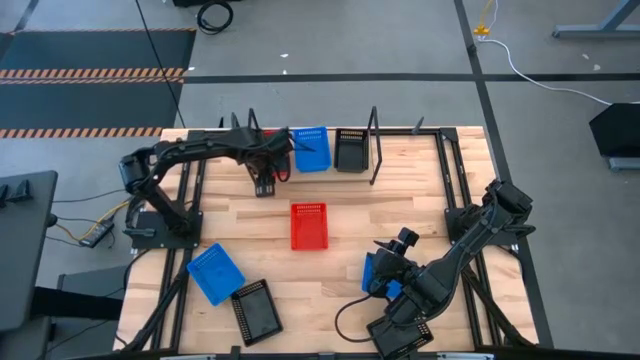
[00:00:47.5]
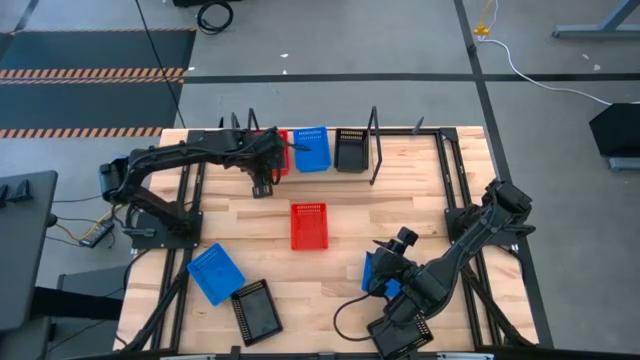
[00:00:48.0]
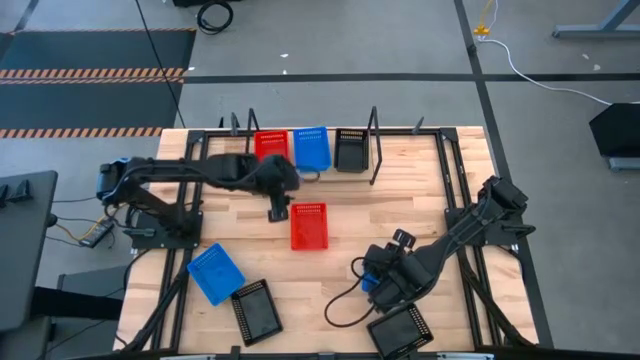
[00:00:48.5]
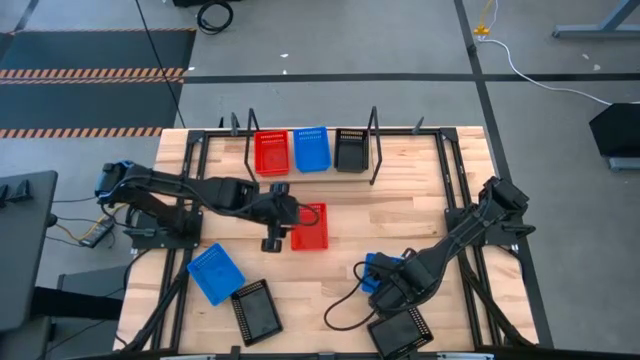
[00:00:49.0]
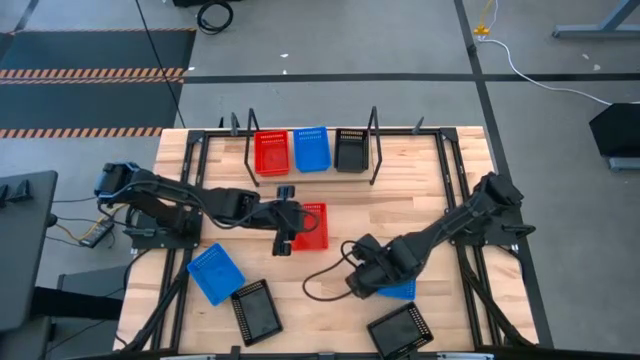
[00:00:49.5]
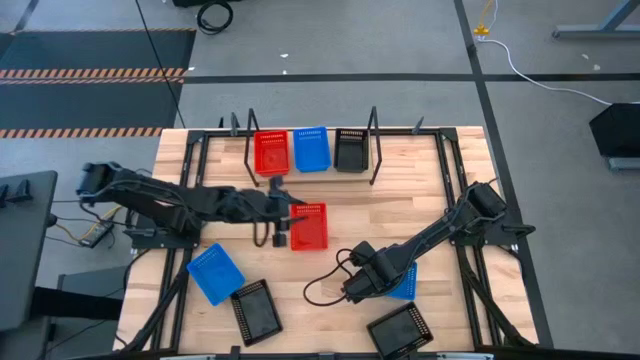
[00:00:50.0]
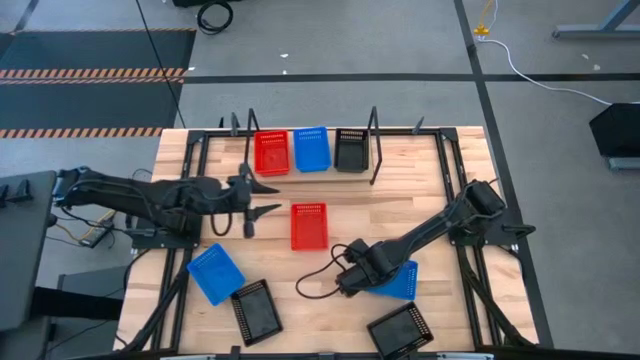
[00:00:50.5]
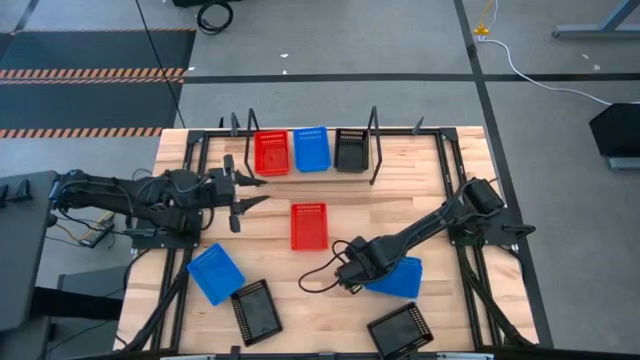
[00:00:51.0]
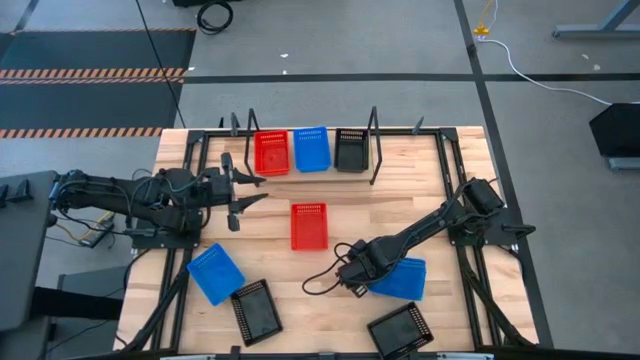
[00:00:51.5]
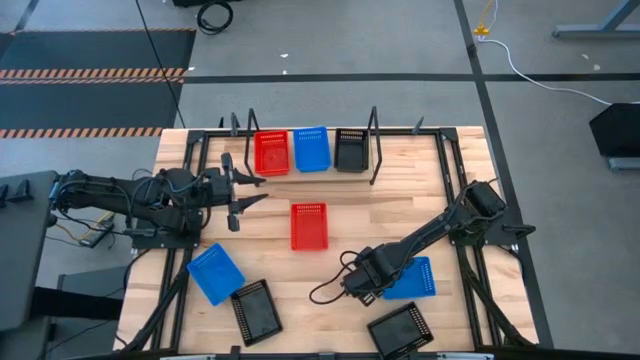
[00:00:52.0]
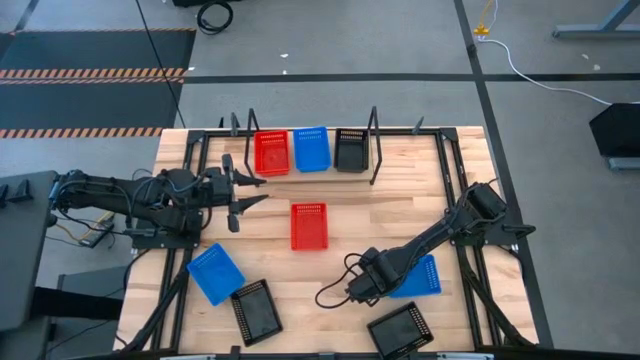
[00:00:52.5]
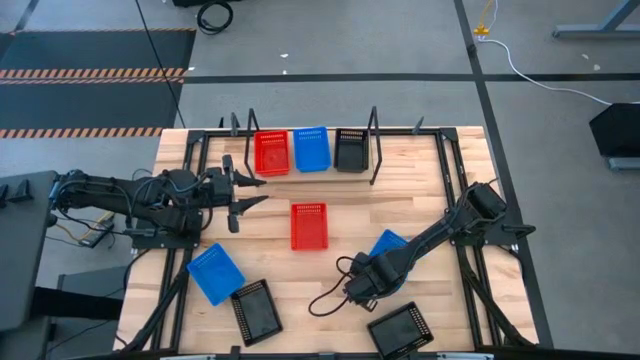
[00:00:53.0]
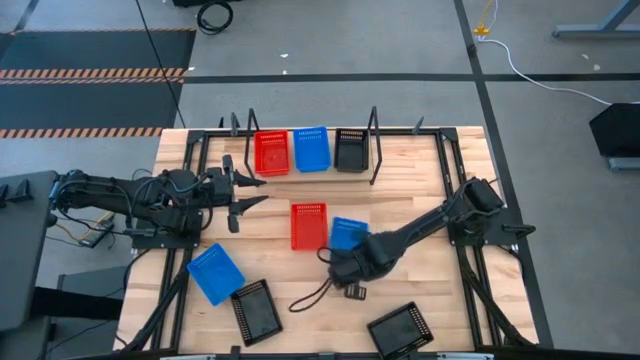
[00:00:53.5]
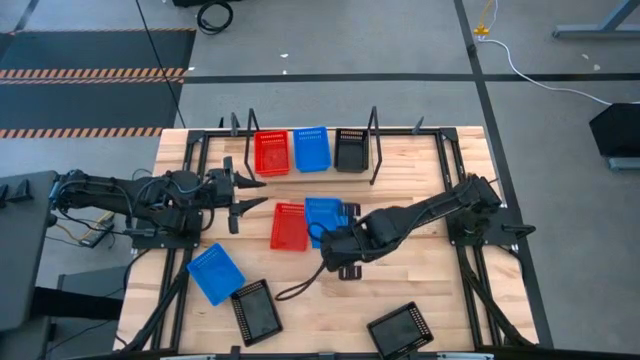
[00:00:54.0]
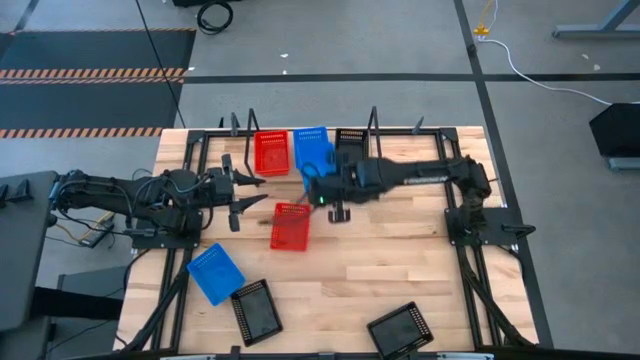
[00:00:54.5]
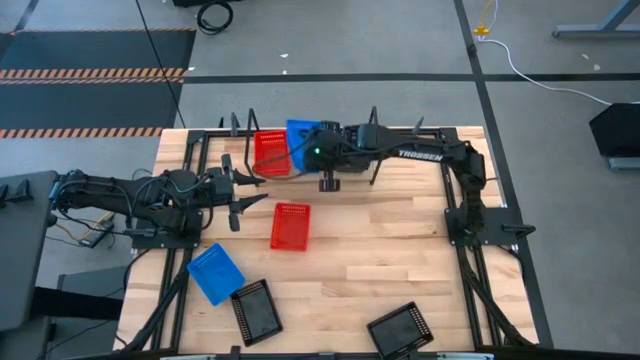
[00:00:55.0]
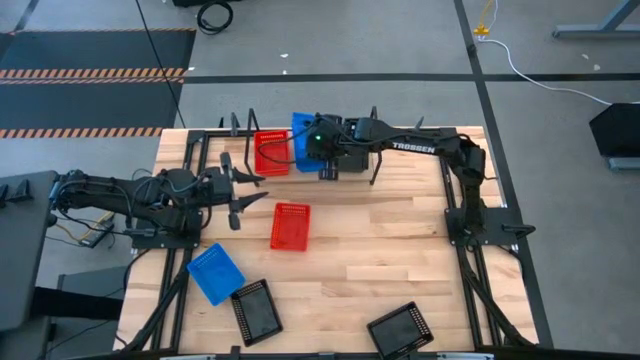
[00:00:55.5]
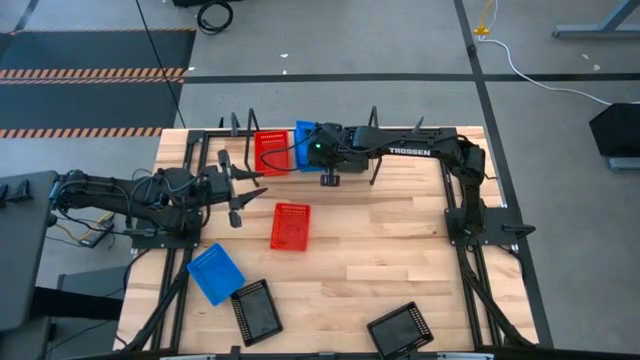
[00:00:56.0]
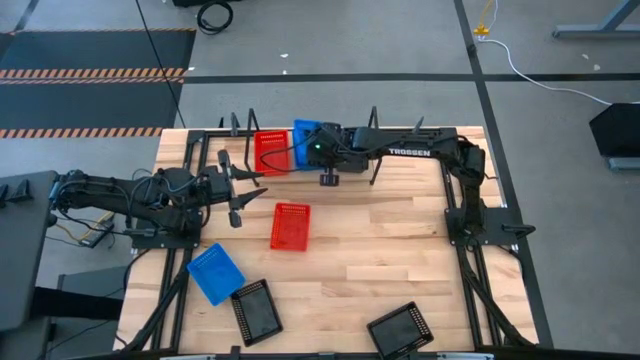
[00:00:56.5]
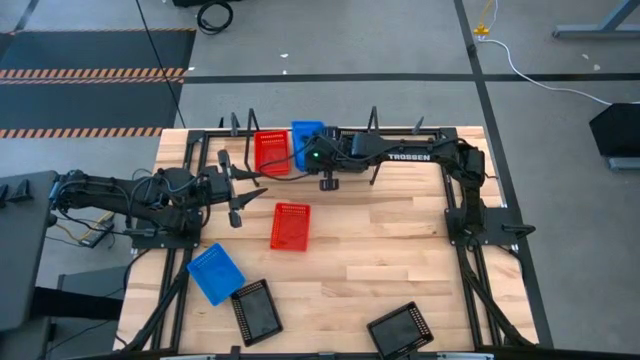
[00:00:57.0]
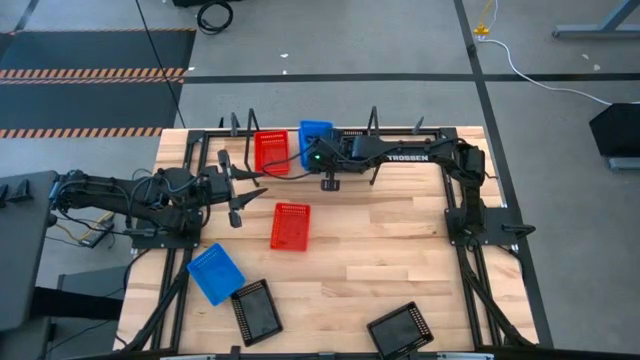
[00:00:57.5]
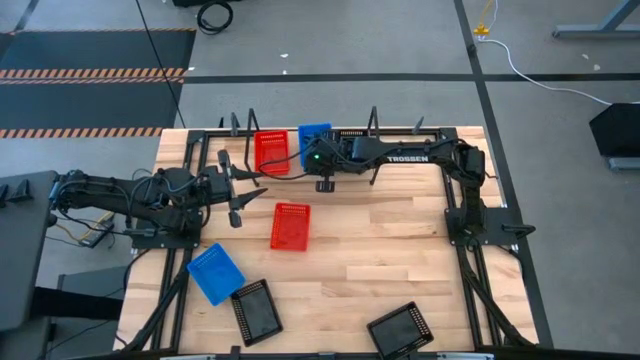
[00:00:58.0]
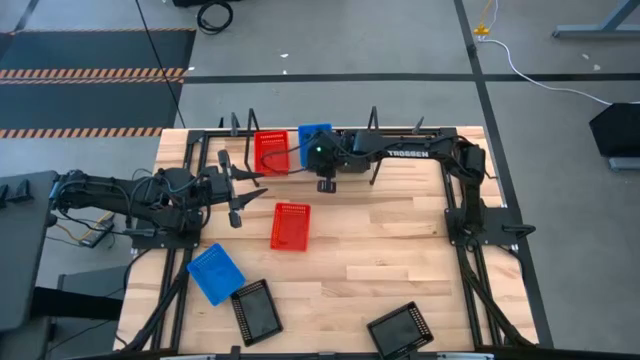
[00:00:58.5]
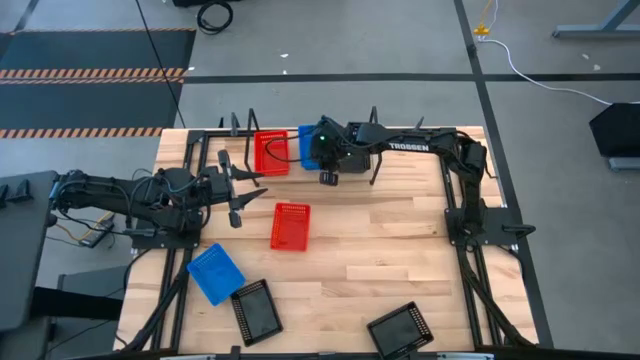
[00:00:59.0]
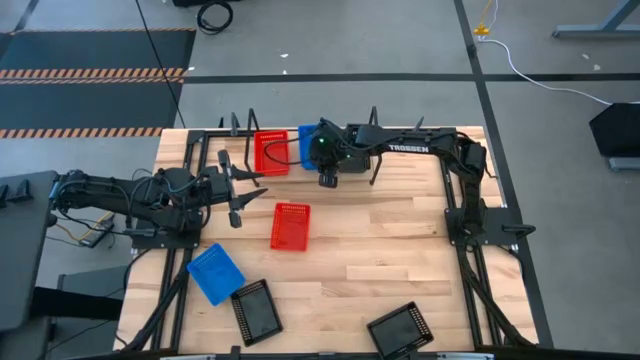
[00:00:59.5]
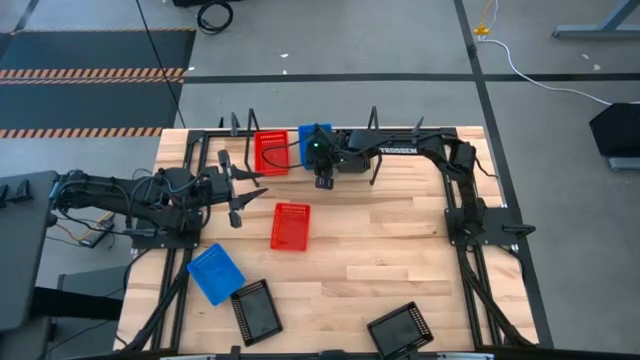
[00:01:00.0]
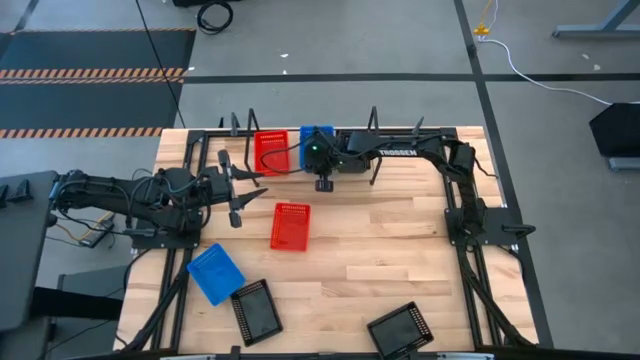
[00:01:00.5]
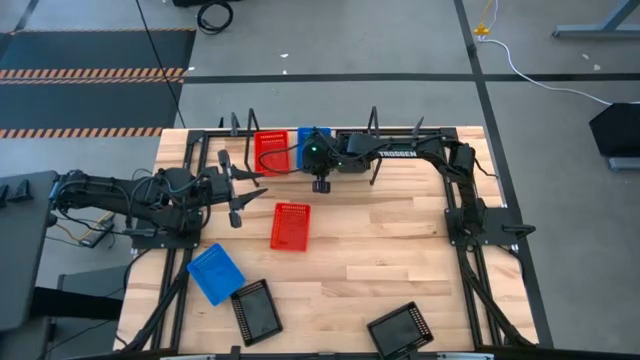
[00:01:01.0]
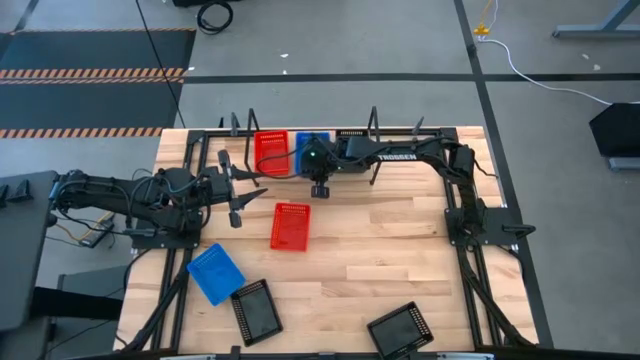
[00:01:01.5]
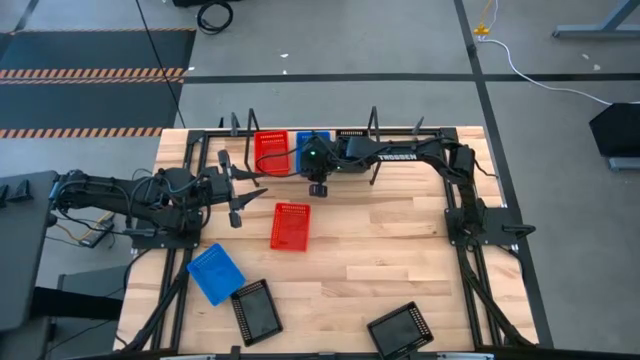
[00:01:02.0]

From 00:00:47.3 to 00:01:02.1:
Task: Stack baskets on shelf by color
Stack the right blue bin on top of the blue bin on the shelf

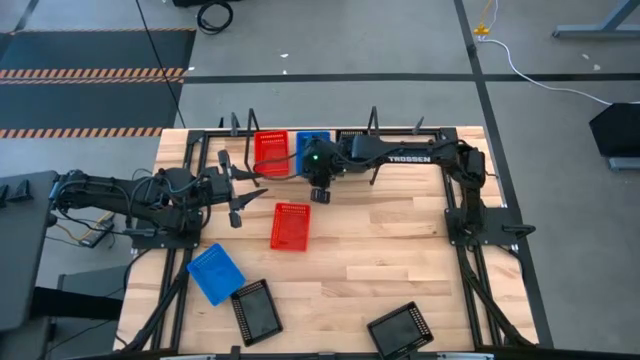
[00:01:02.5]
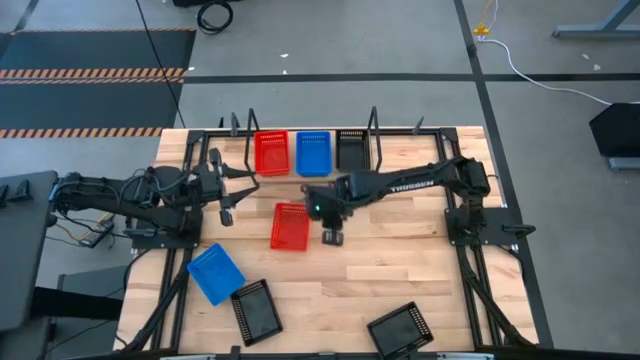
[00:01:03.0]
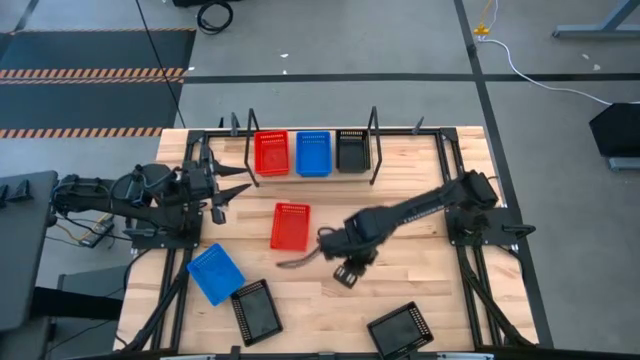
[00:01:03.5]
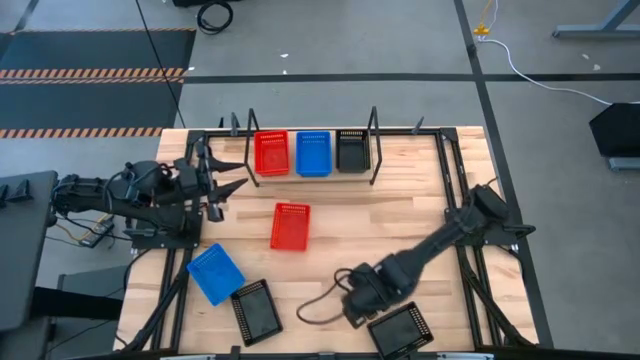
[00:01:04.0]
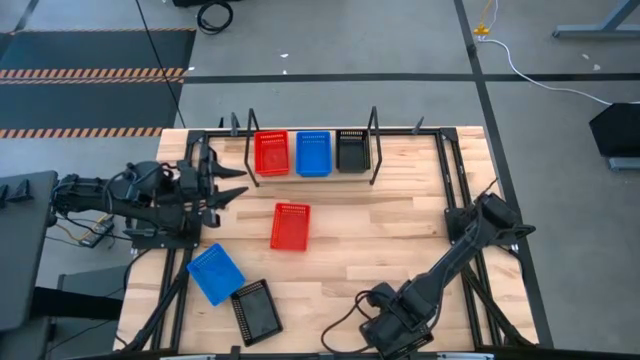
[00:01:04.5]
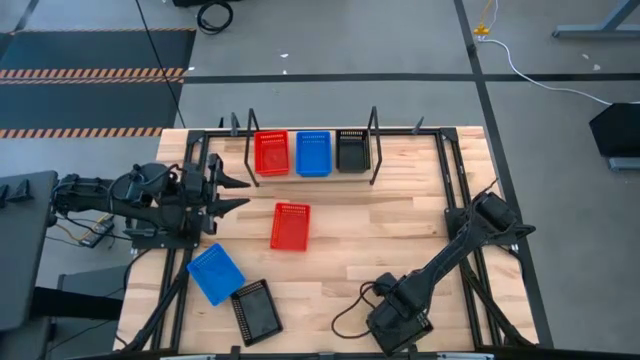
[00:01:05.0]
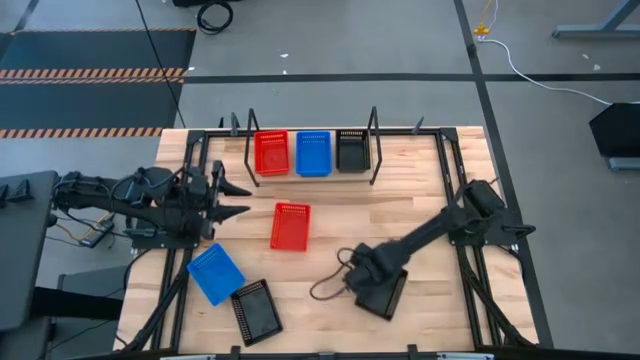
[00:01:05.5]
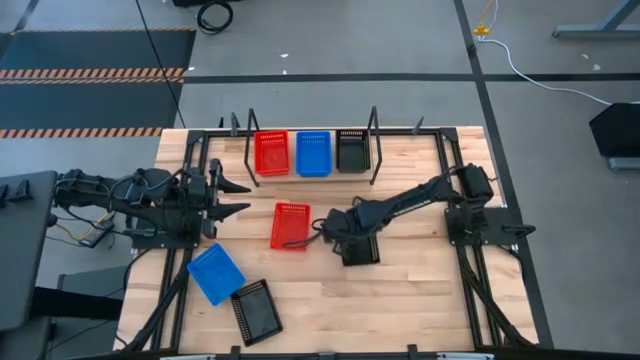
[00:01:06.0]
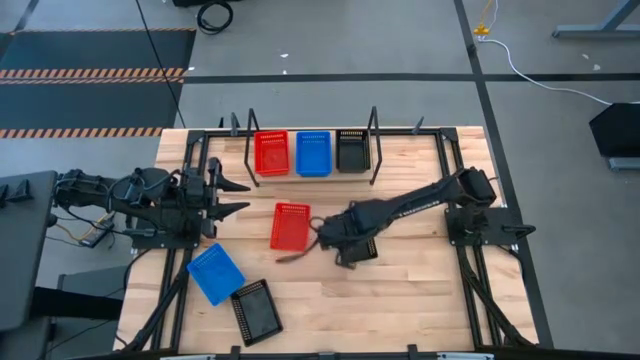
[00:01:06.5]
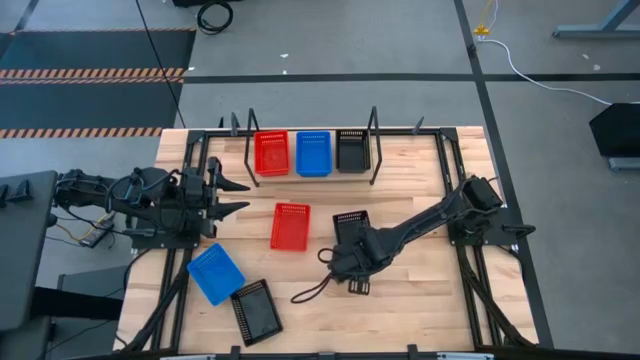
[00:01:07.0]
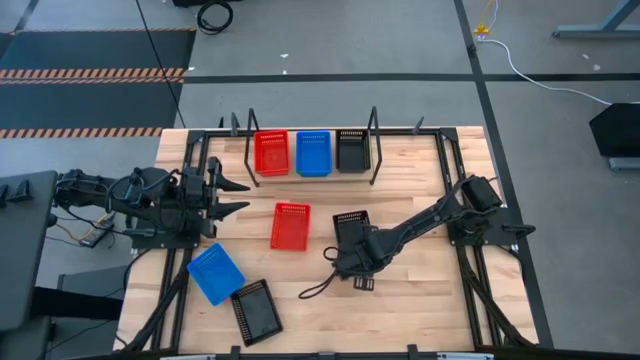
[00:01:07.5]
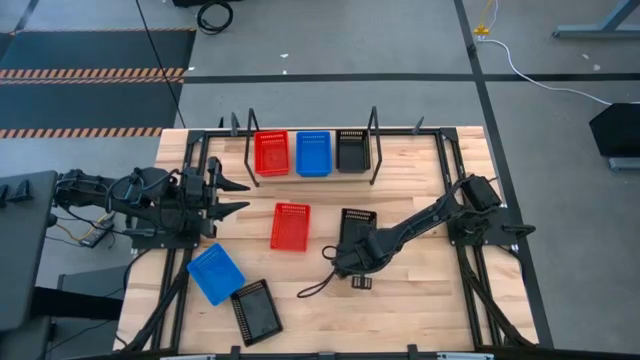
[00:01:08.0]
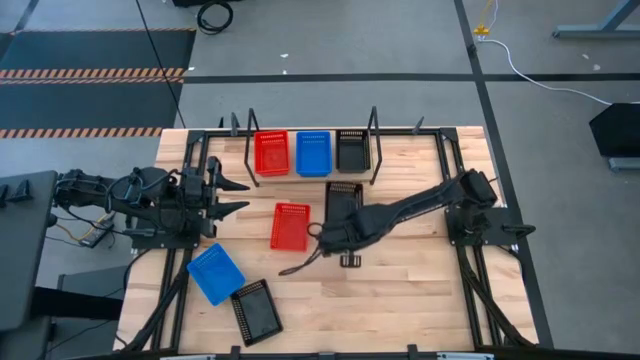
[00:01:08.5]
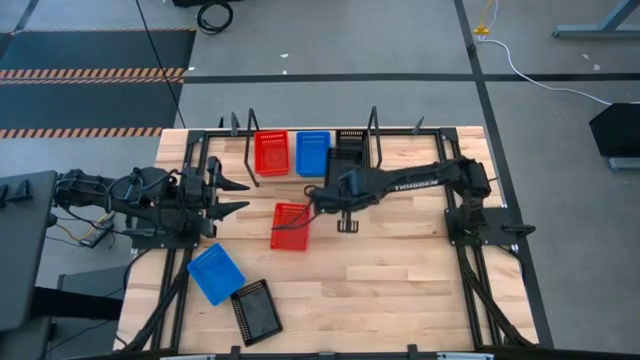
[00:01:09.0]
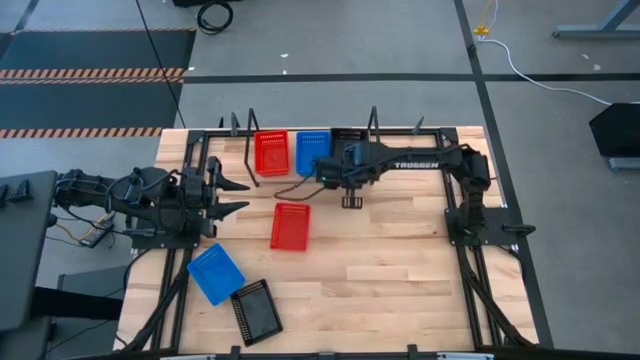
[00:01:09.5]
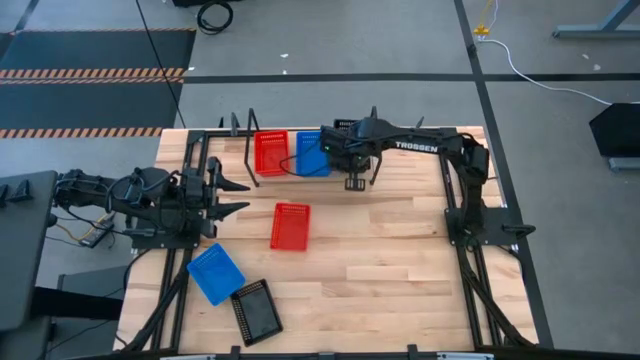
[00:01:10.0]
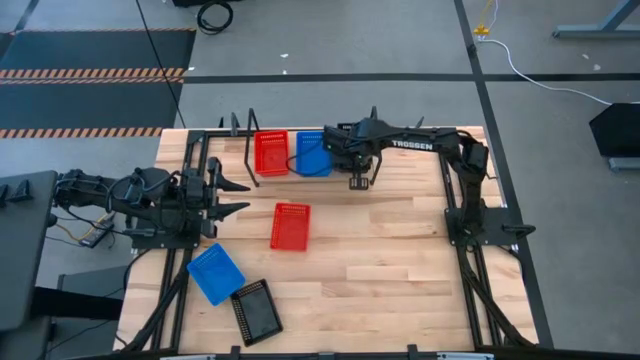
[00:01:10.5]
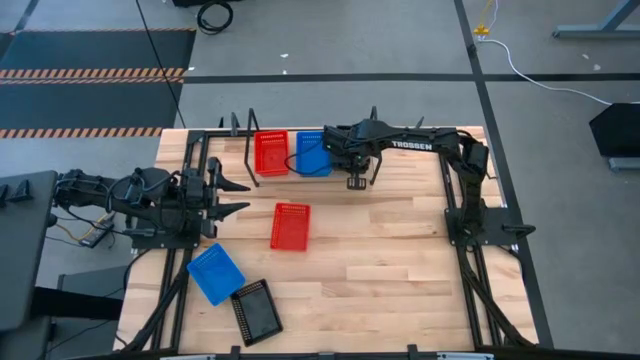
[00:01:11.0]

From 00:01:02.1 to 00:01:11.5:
Stack the right black bin on top of the black bin on the shelf
